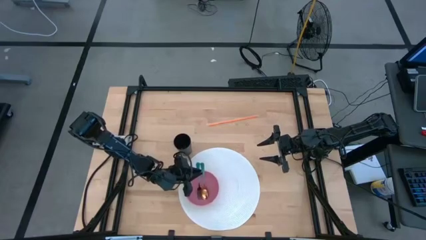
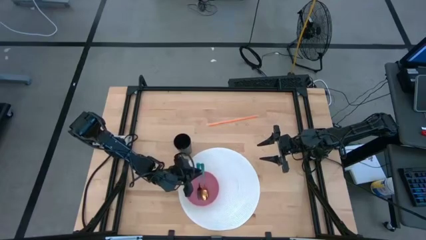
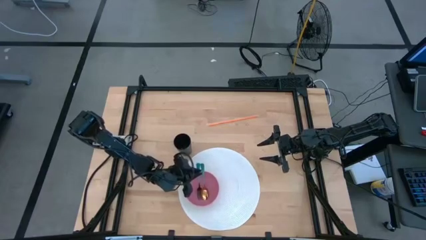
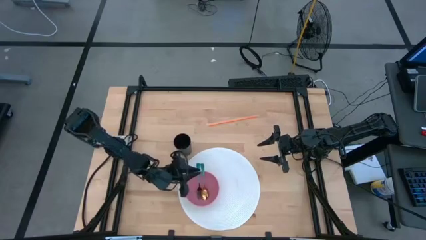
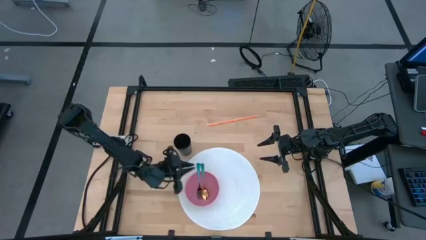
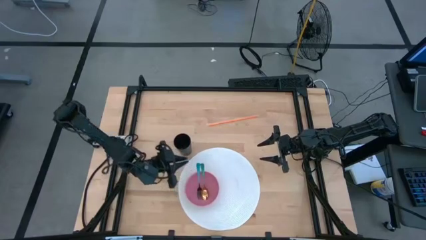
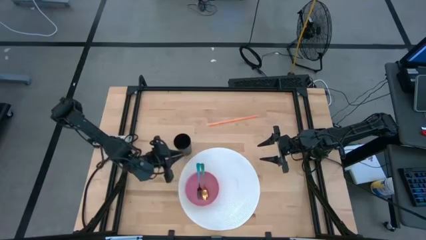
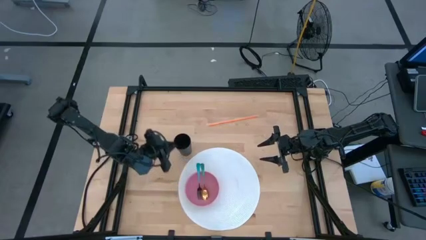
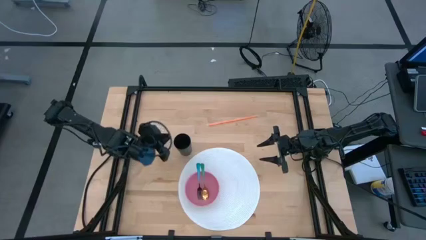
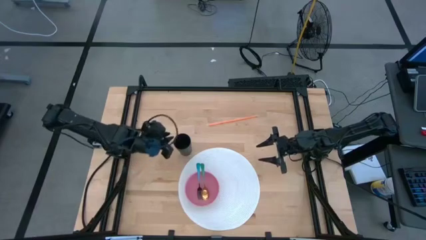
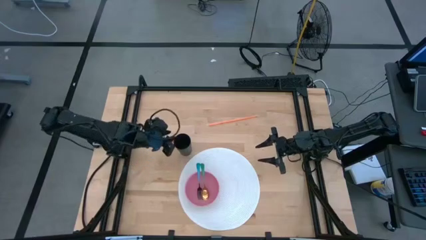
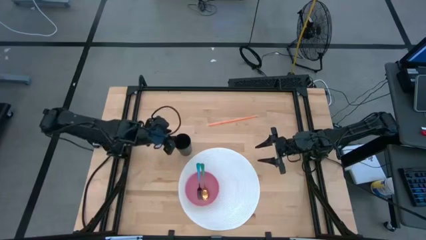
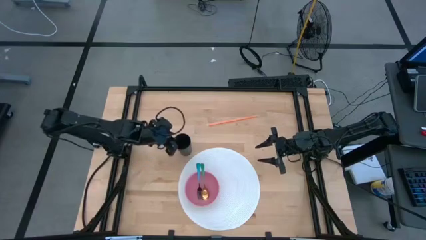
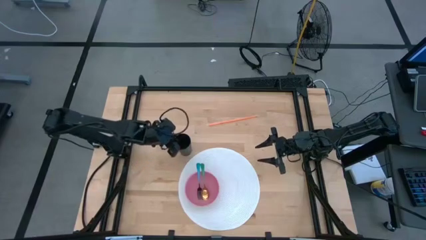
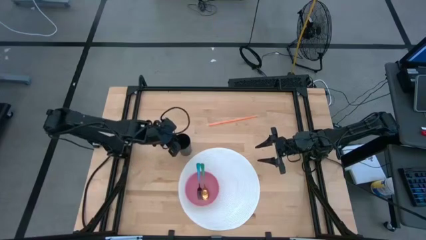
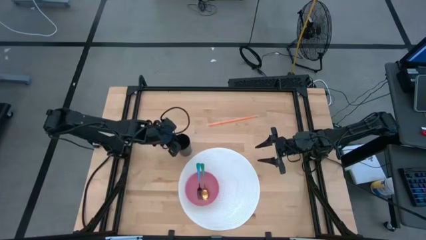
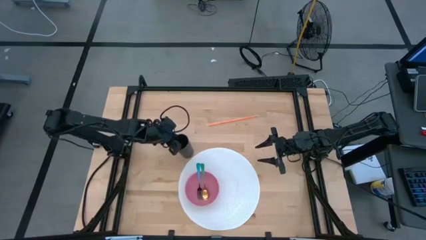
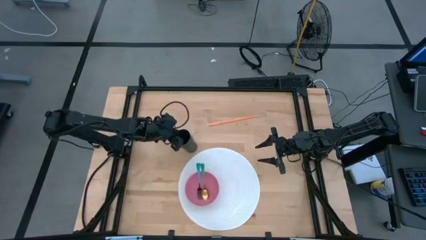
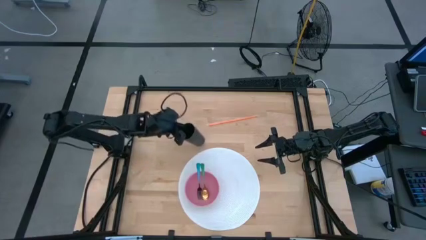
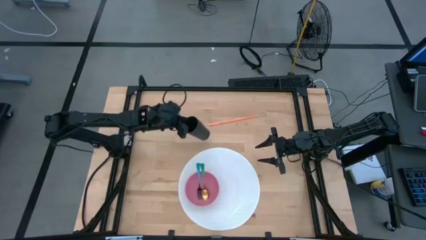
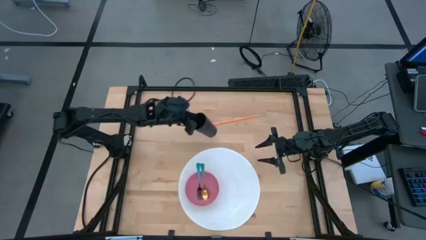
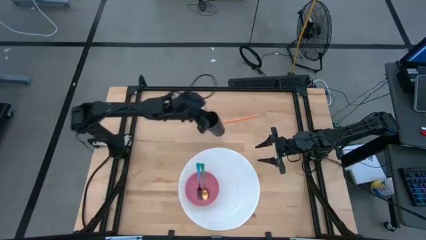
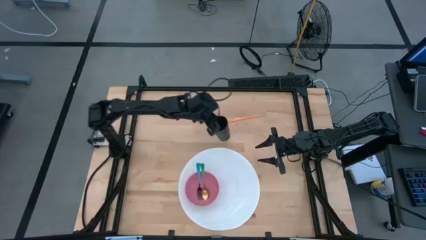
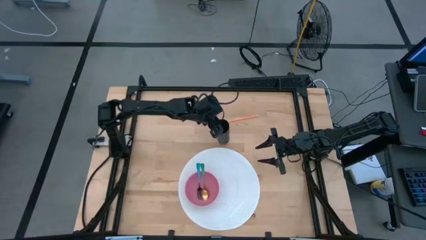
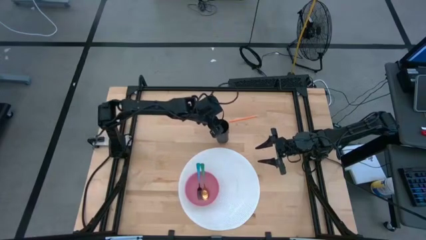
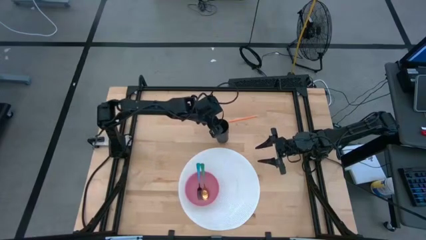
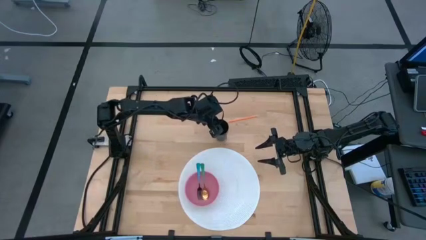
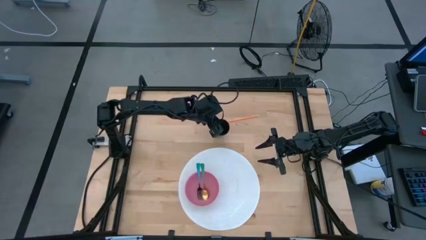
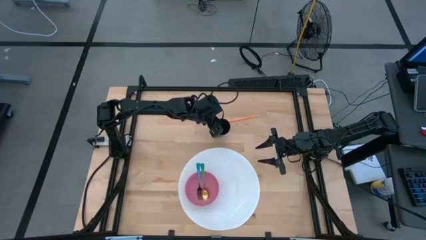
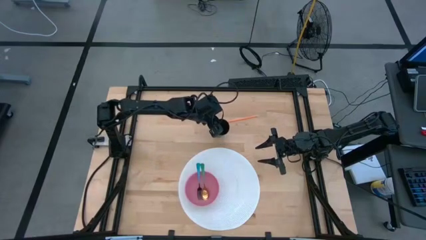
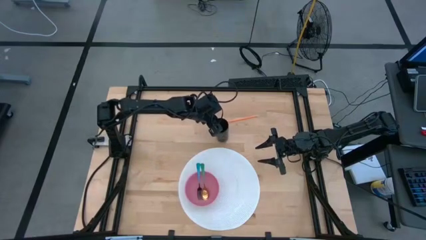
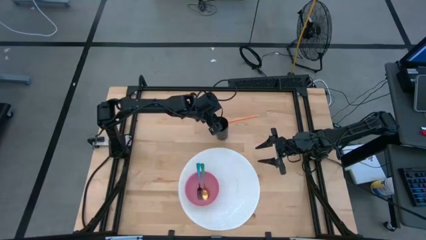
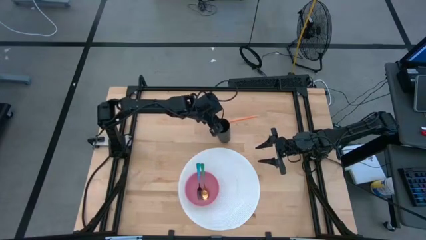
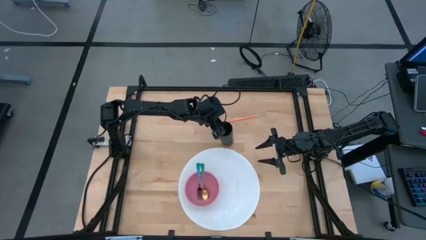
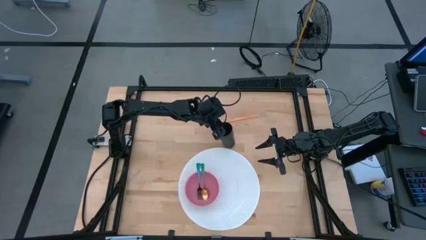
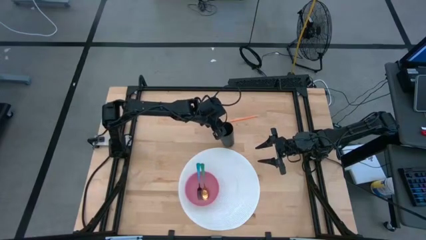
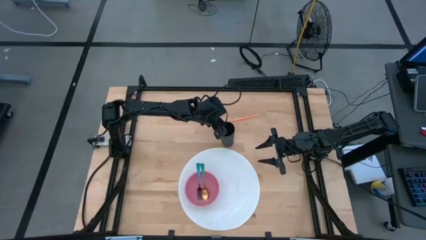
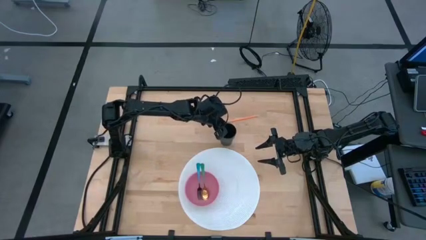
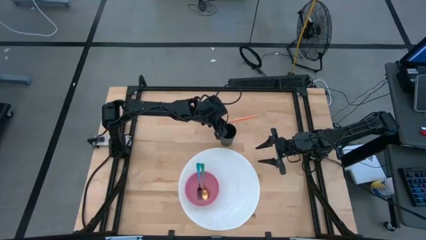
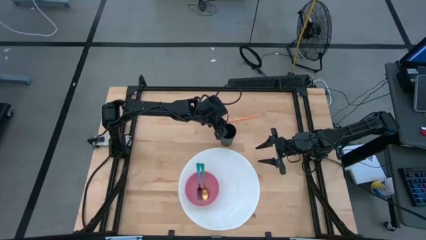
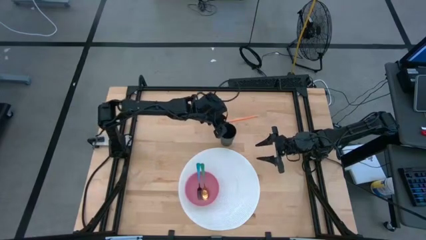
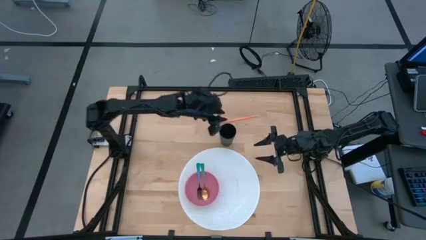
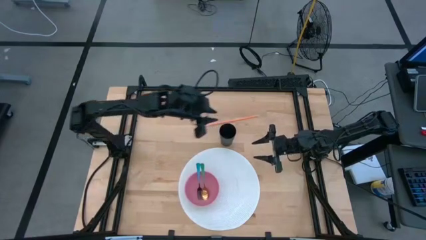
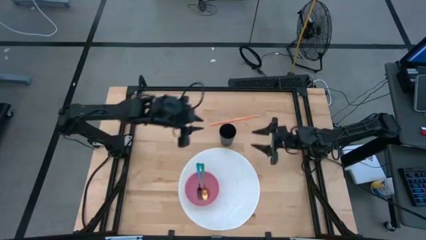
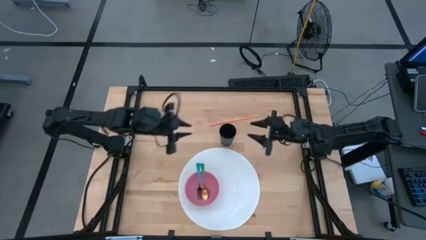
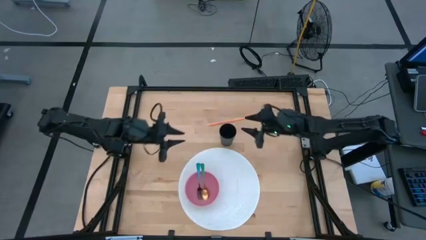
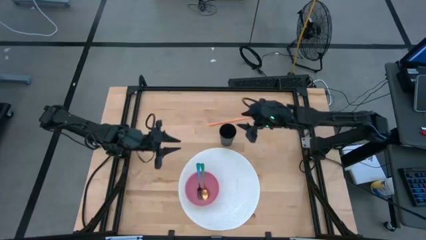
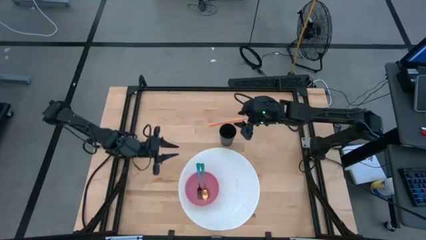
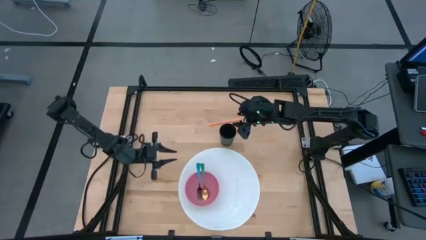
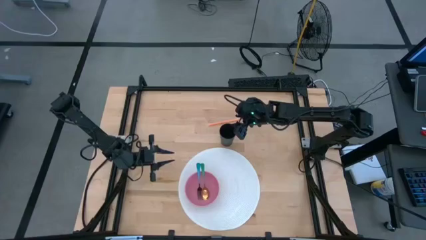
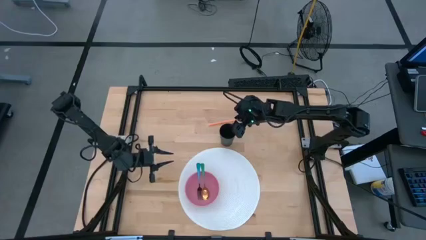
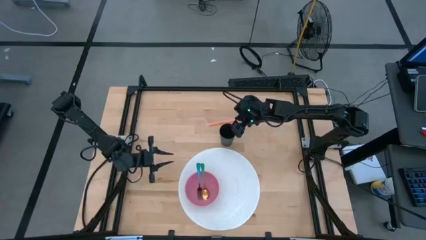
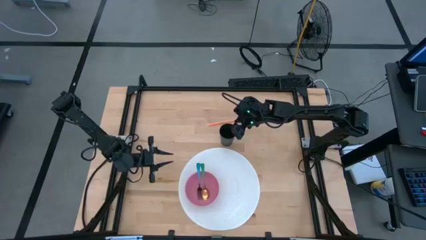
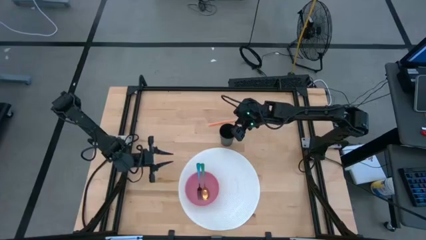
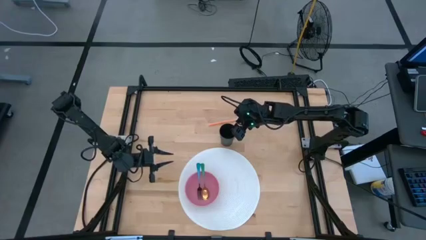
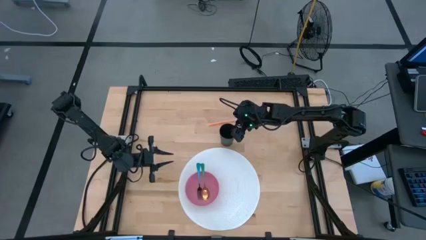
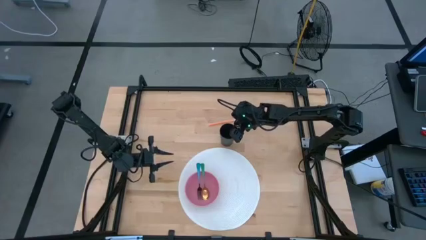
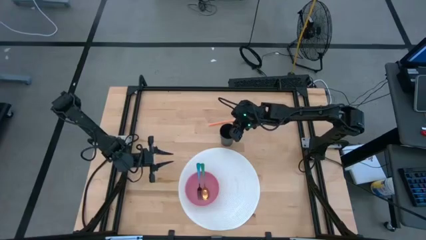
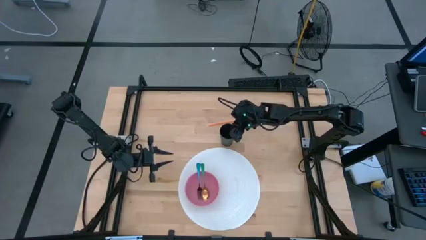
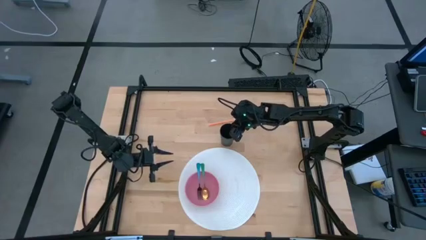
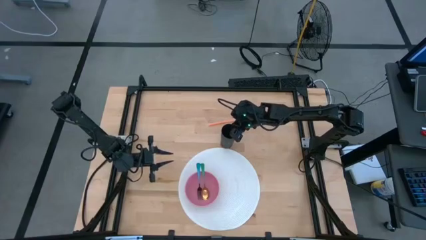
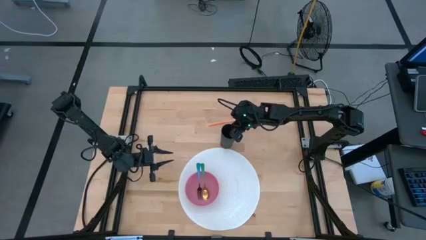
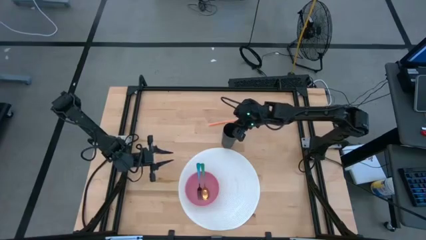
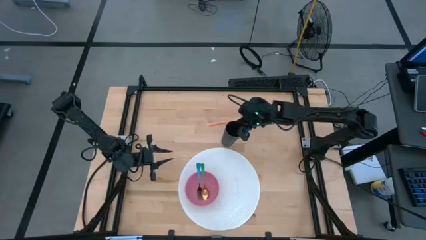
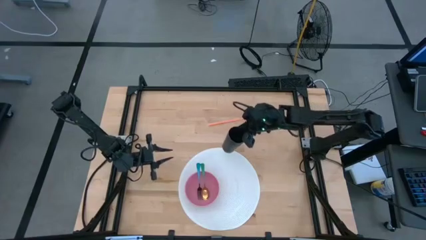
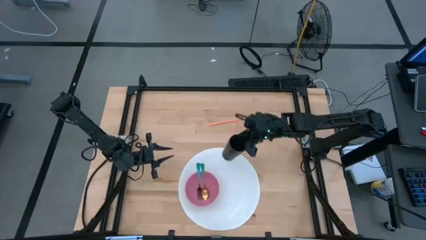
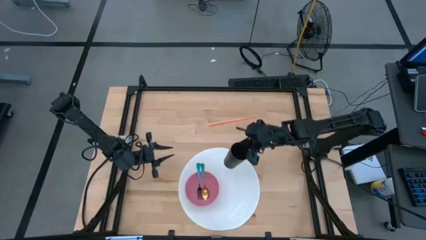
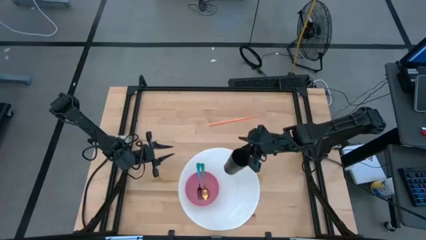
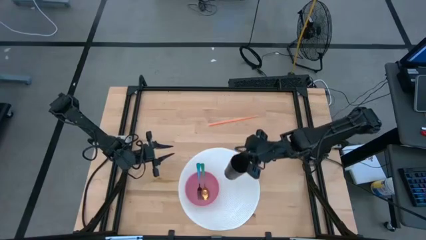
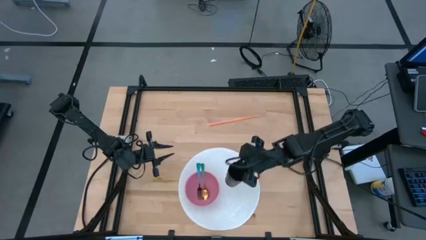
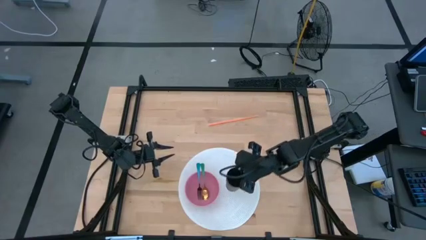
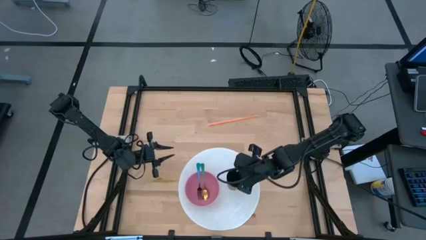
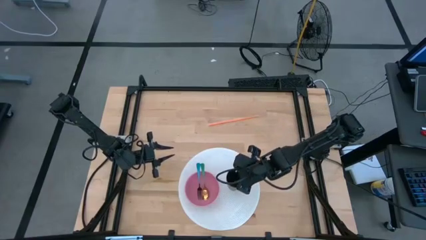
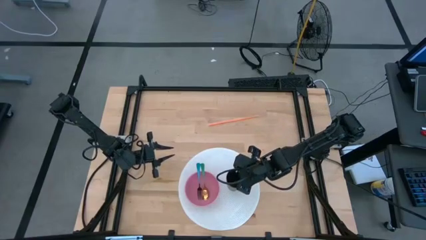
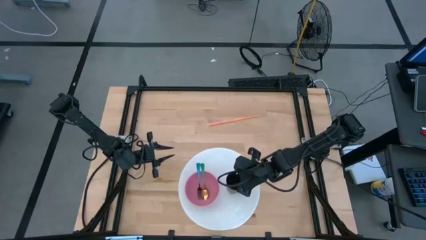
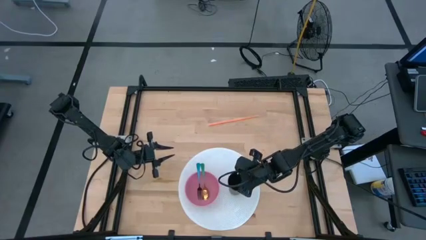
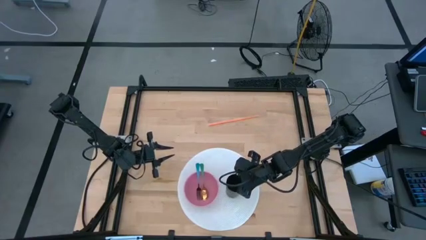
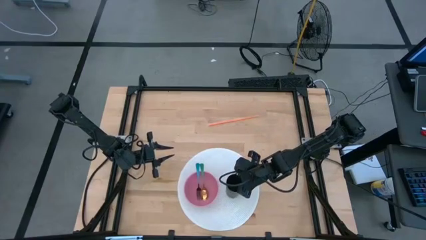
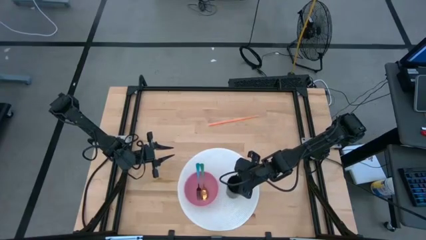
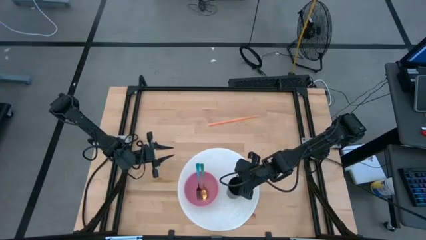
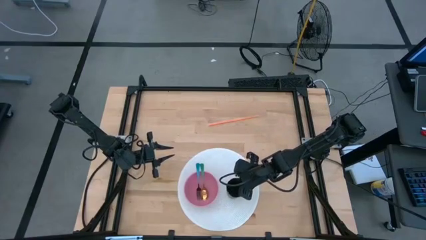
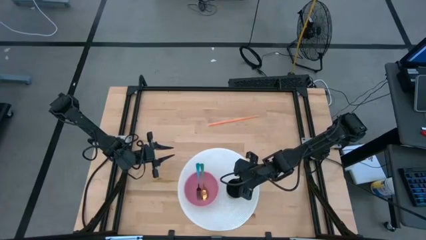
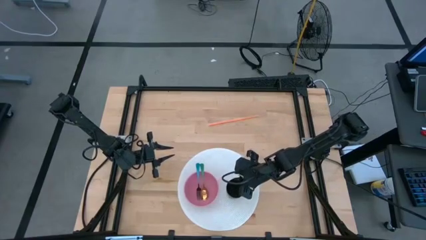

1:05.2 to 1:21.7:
Task: Pick & Place Utensil
Put the black cup on the white table mat at the right of the pink bowl
